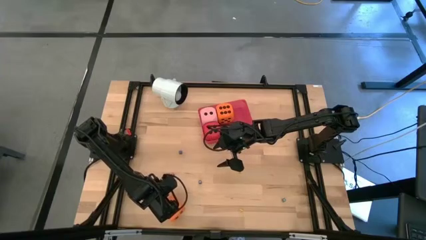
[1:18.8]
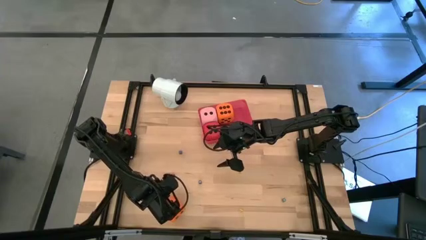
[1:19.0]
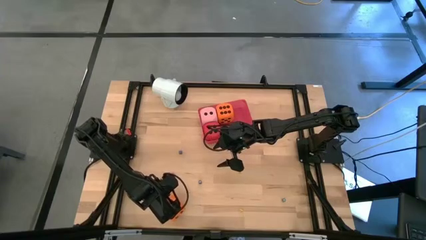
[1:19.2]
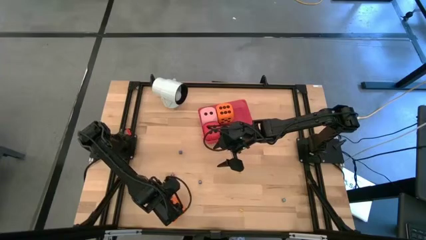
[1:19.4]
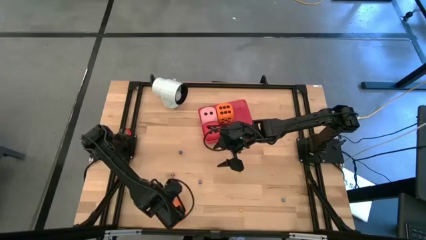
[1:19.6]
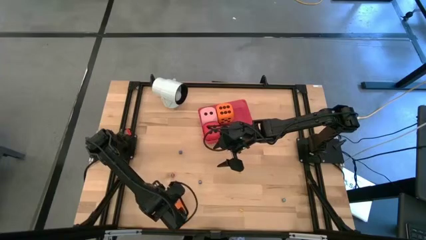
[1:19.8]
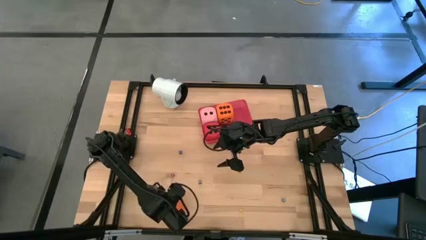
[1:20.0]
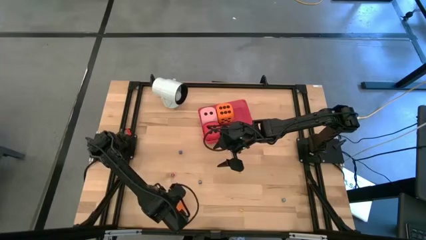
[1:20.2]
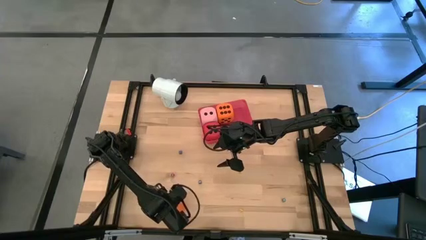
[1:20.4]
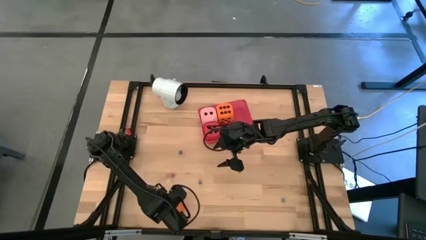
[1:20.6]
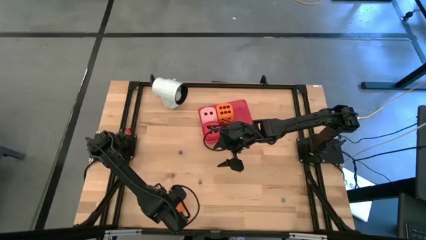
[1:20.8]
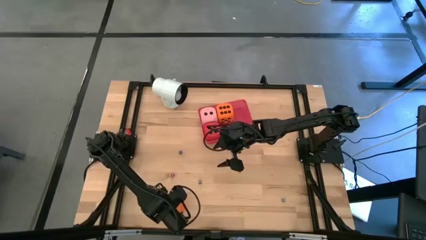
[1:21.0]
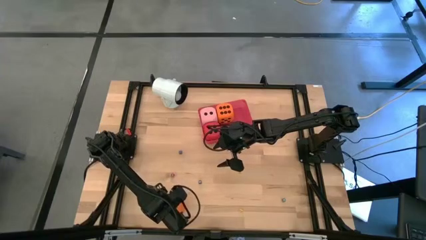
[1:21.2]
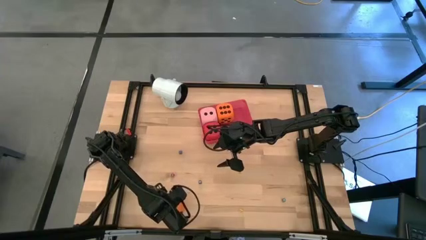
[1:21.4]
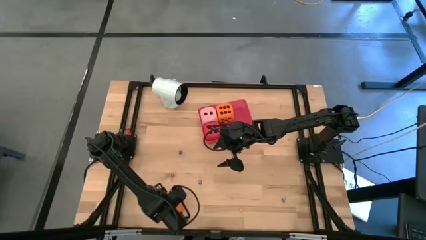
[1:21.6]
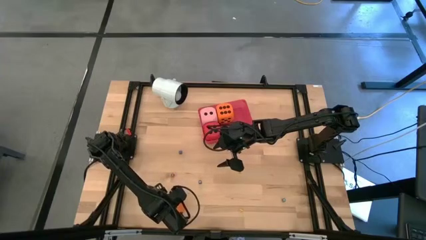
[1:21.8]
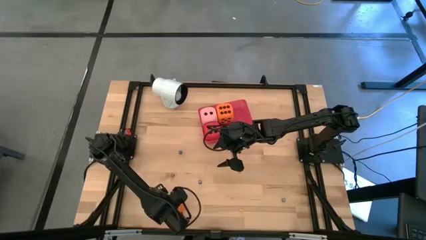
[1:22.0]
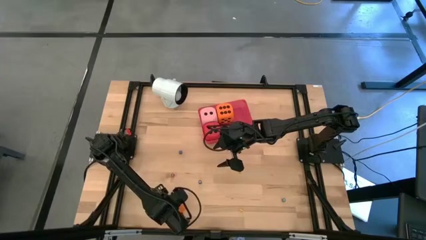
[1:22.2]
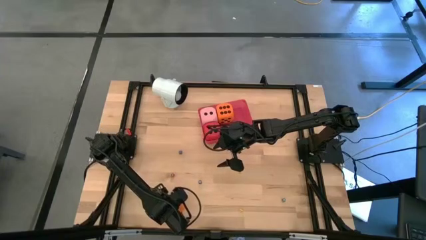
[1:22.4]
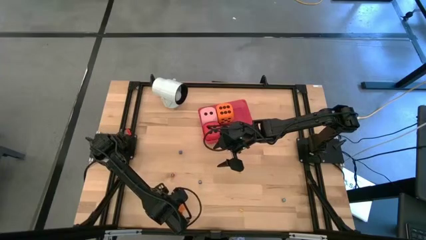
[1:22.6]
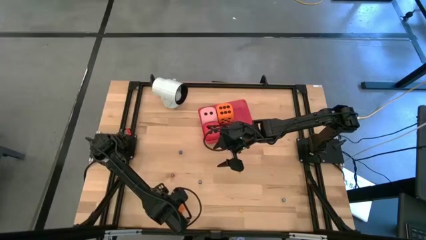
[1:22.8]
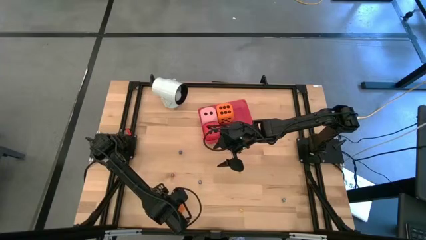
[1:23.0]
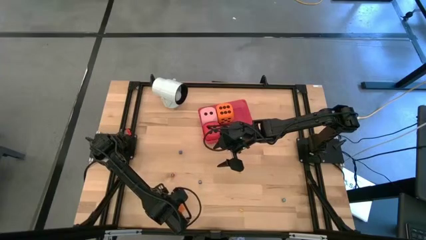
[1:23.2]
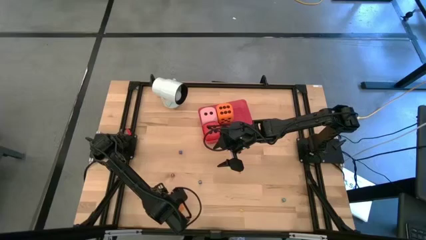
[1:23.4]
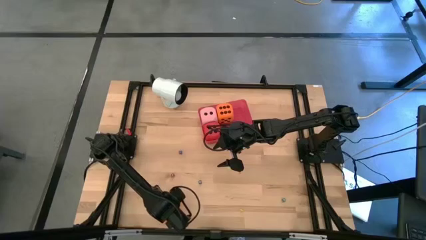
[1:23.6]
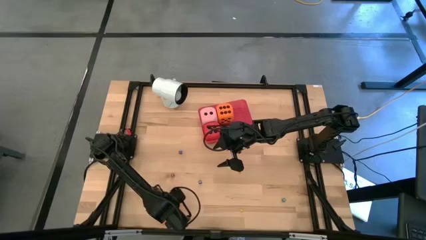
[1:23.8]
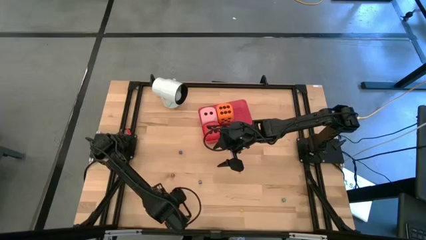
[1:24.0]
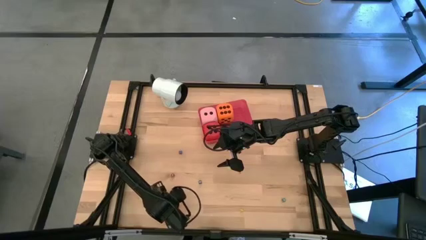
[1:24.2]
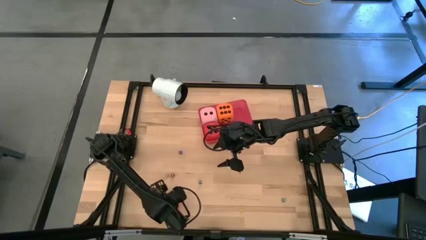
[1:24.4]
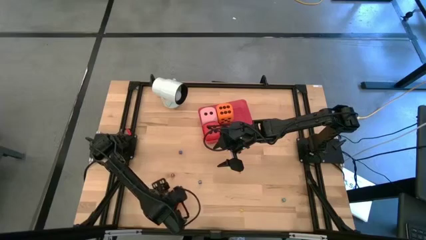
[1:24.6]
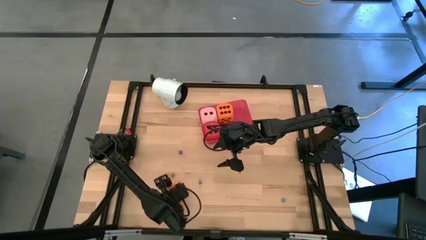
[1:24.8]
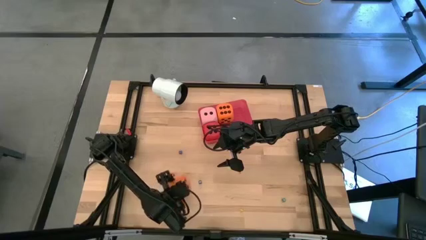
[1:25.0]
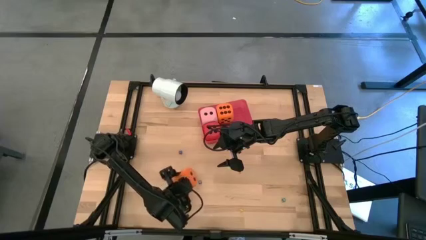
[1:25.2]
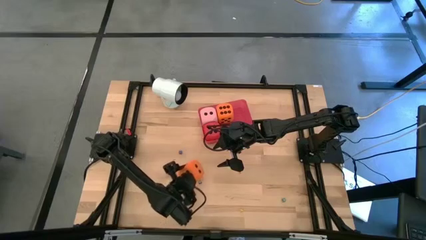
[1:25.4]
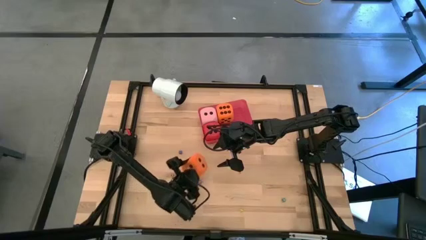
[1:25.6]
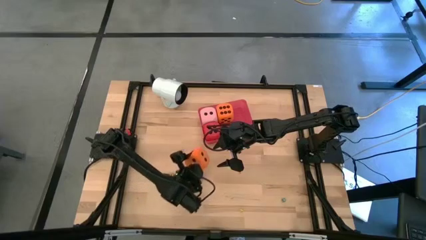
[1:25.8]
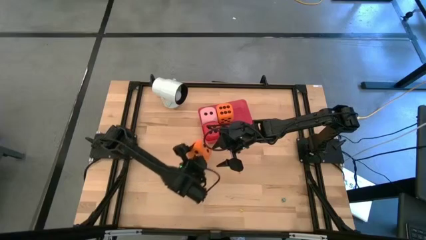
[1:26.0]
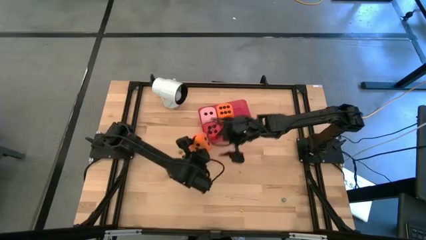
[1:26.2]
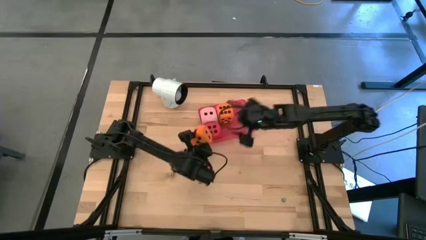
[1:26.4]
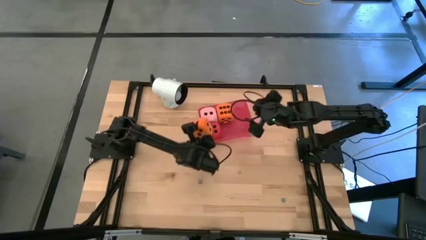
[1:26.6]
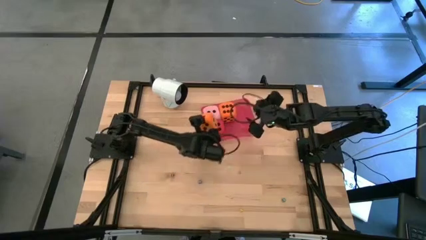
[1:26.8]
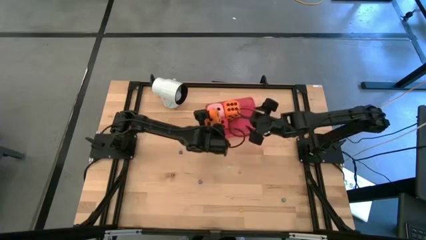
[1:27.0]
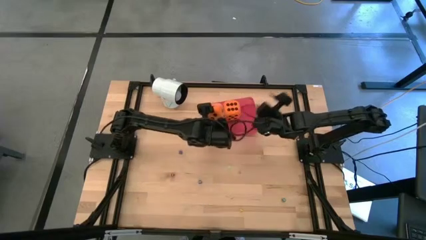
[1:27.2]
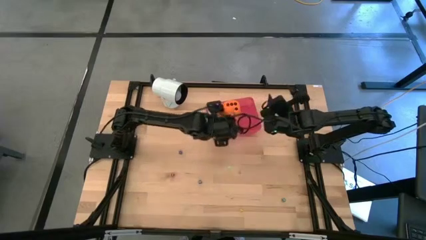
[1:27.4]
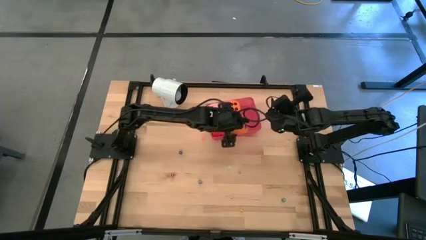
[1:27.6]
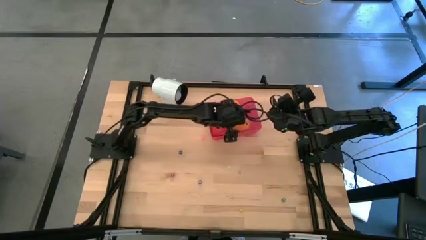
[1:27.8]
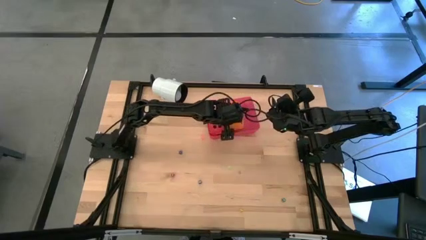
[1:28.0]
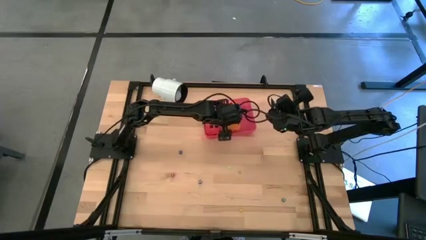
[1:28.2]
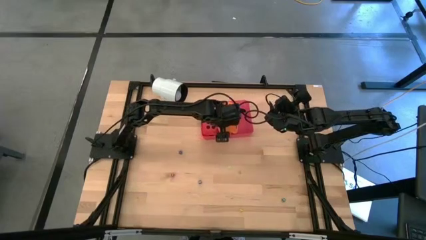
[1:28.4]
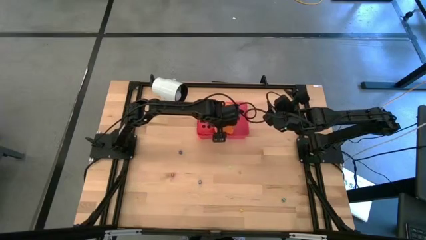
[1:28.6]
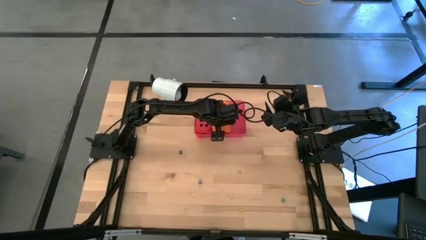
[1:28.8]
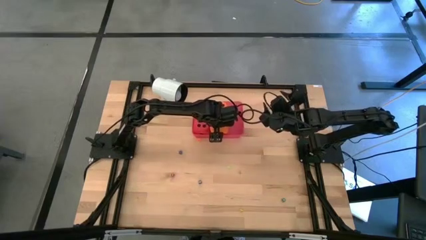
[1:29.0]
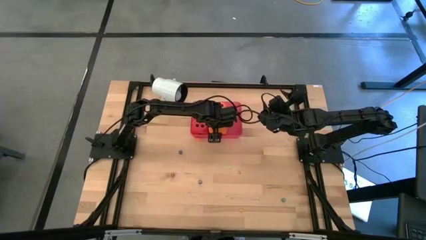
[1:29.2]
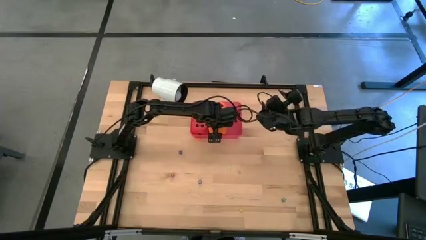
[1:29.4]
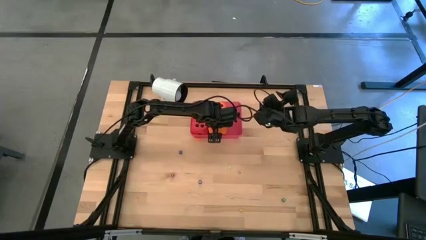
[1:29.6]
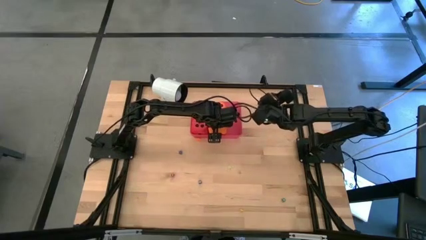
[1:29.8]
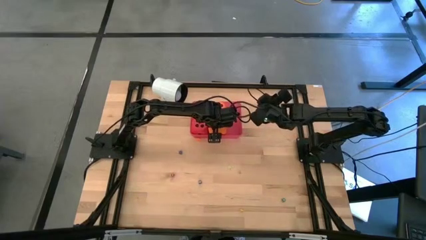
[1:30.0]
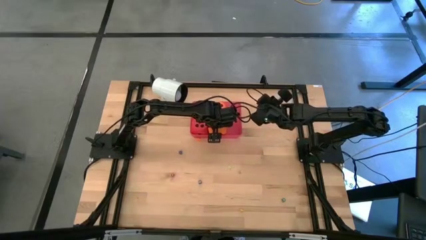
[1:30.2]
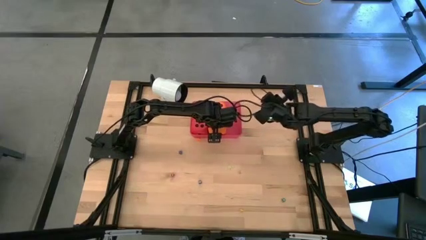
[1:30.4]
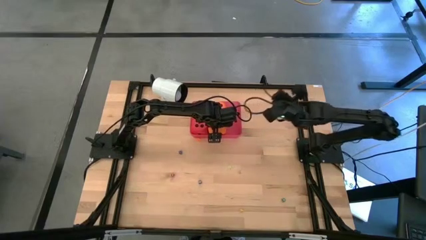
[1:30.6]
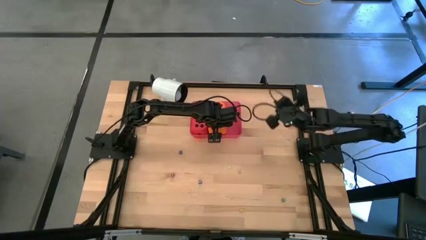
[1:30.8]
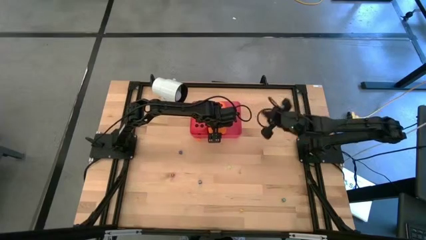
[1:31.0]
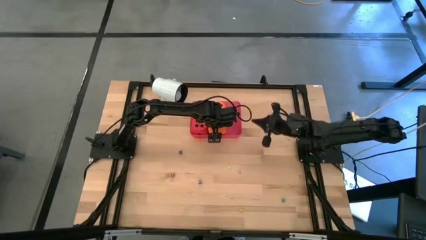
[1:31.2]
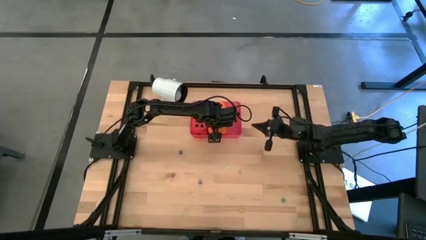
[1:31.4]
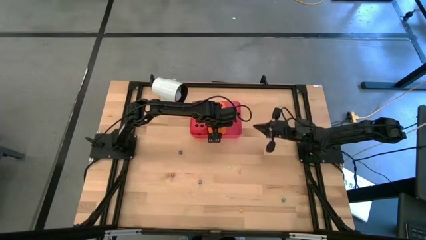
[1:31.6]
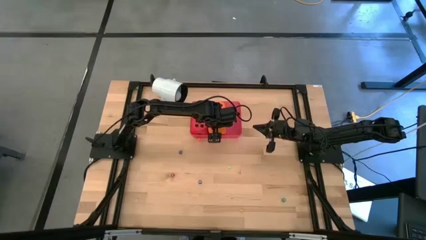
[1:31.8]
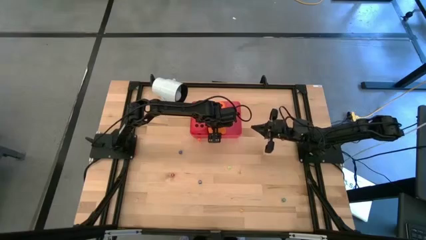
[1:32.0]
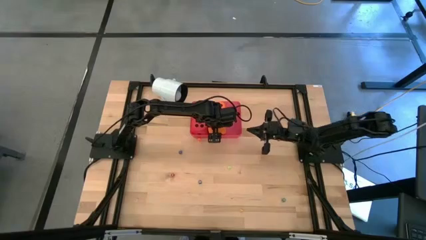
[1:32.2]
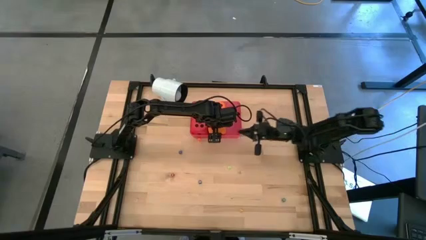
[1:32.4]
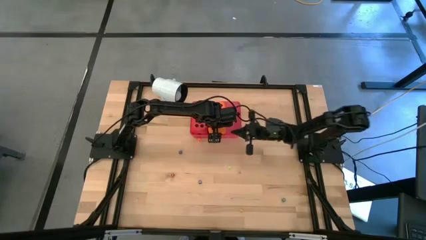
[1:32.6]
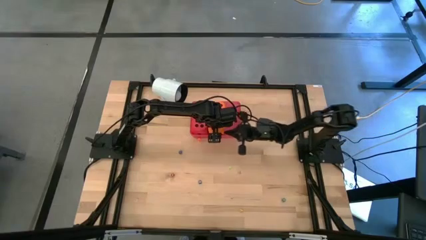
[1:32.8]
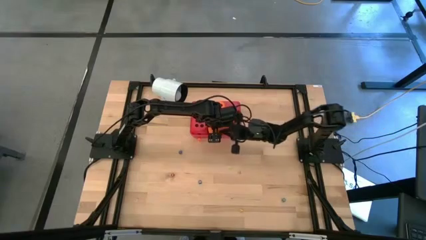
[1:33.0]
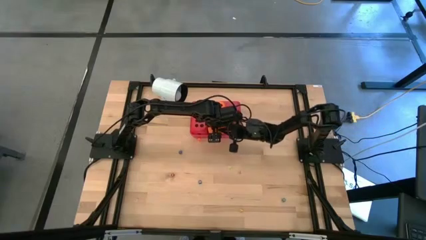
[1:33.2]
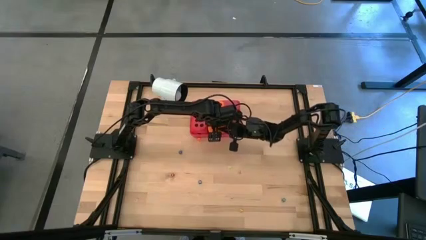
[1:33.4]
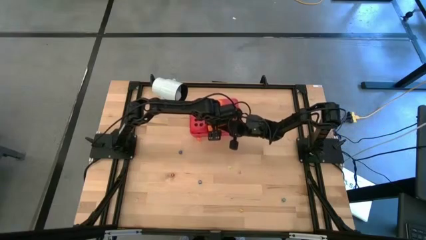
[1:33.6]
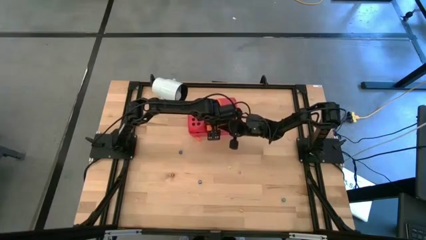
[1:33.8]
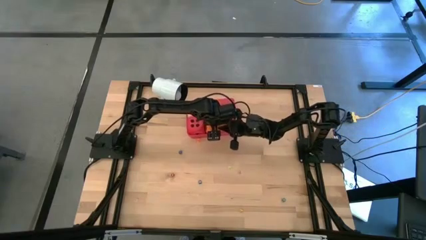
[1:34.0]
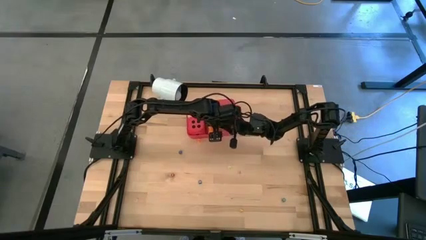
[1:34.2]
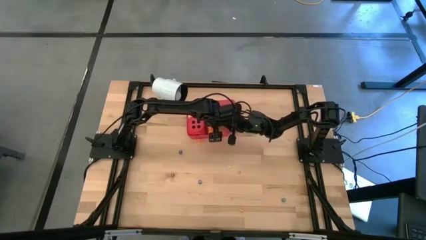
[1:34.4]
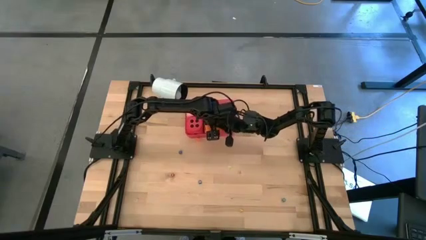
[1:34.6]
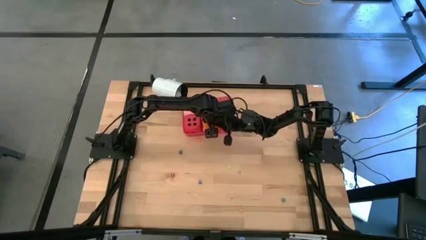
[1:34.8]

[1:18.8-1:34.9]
Task: Pick & Place Dice
Put the big orange dice into the red bin
